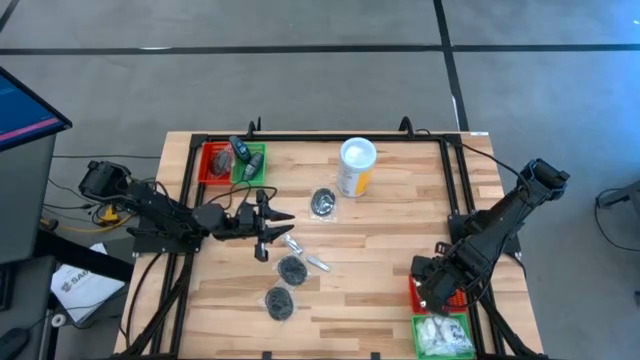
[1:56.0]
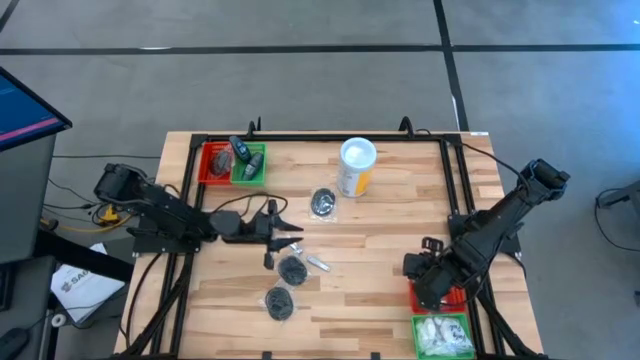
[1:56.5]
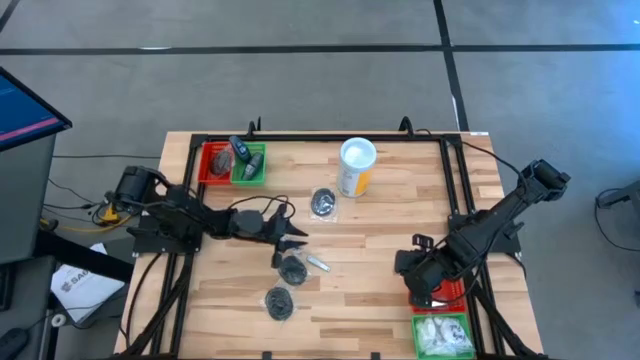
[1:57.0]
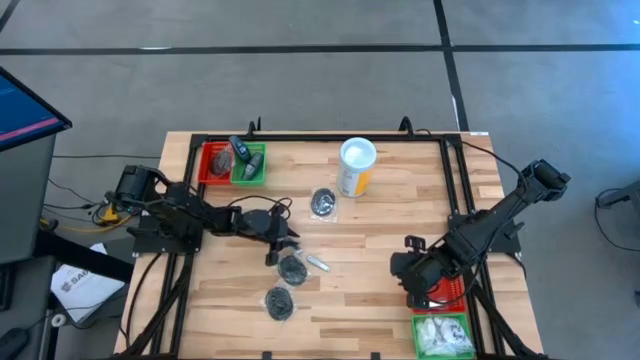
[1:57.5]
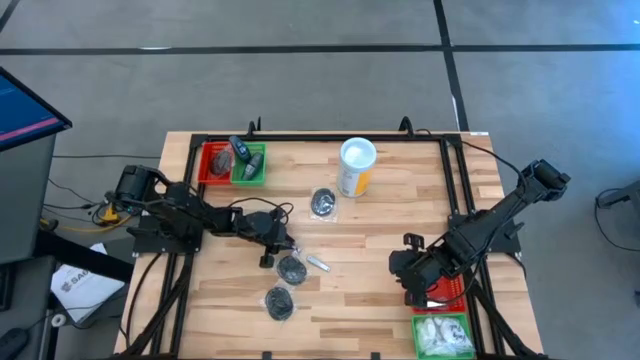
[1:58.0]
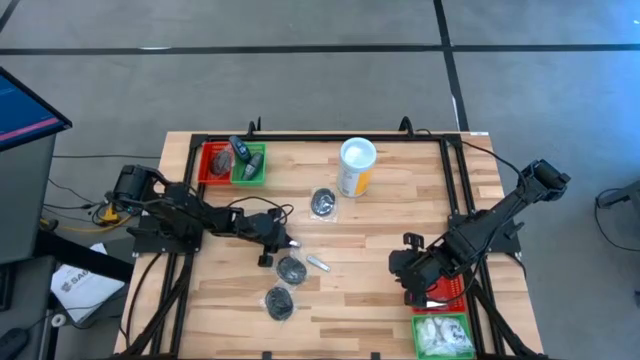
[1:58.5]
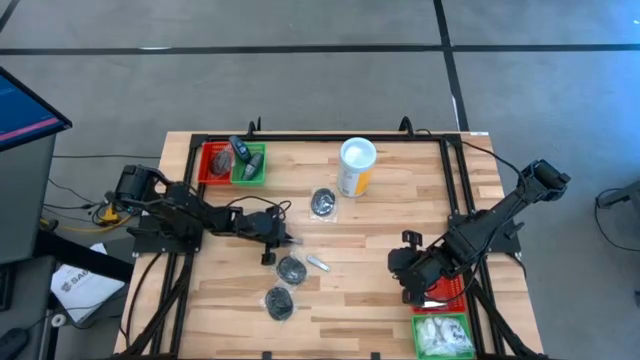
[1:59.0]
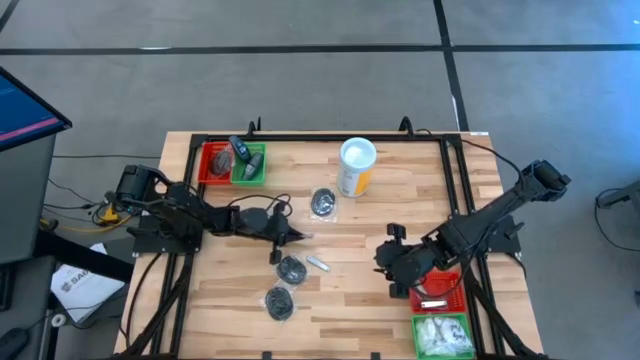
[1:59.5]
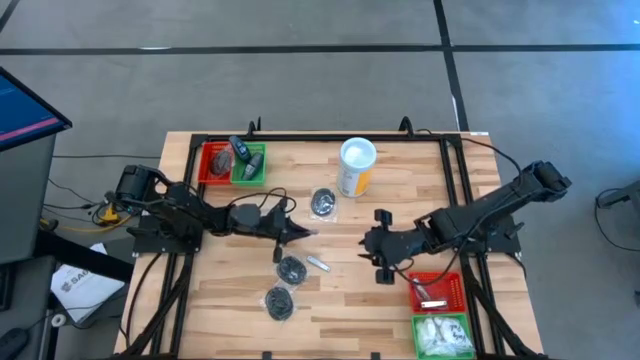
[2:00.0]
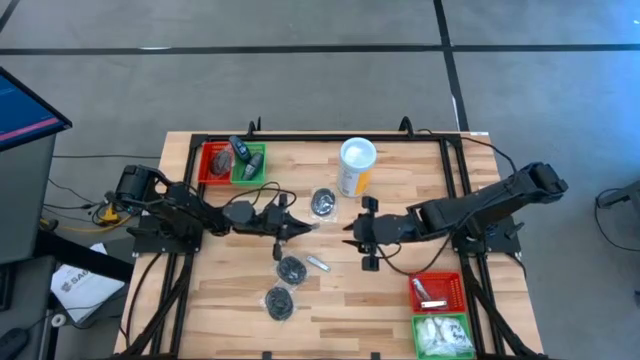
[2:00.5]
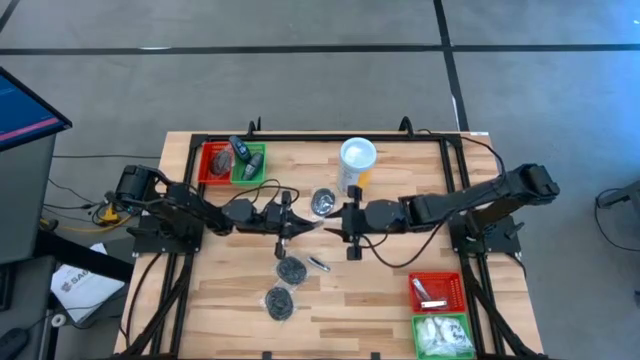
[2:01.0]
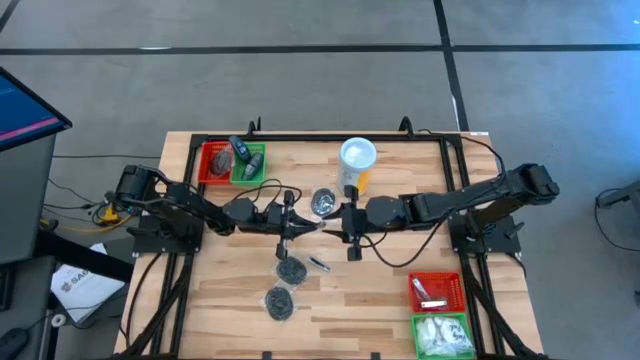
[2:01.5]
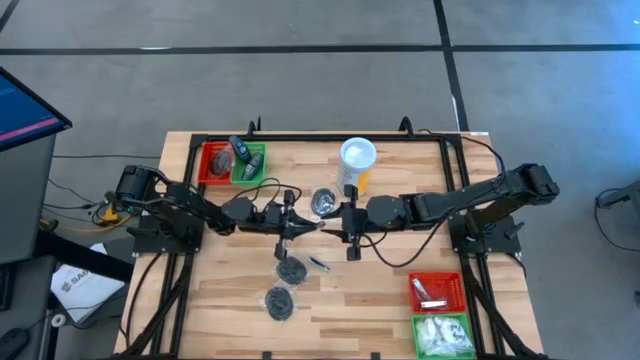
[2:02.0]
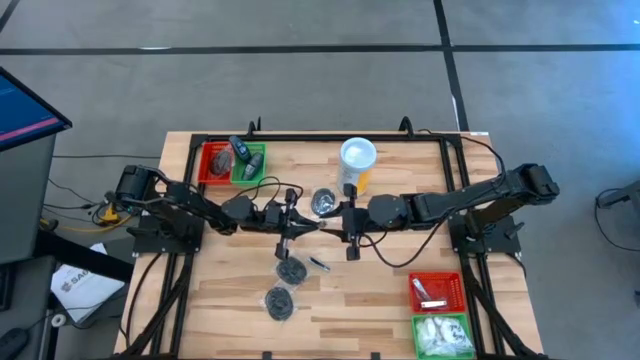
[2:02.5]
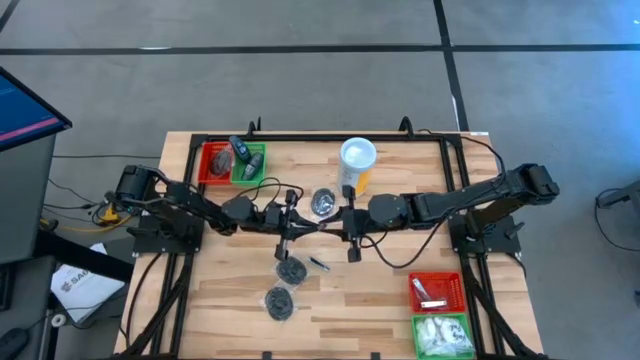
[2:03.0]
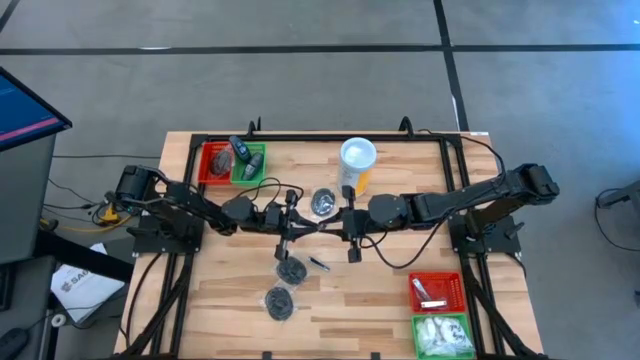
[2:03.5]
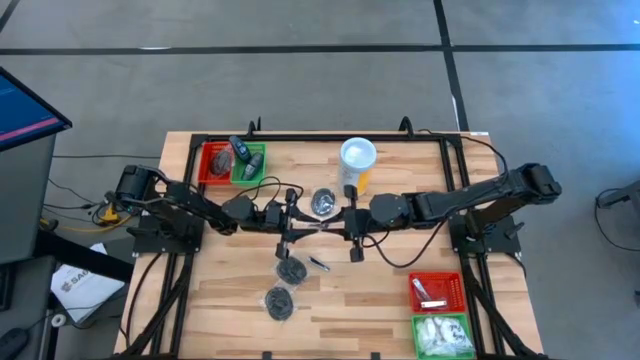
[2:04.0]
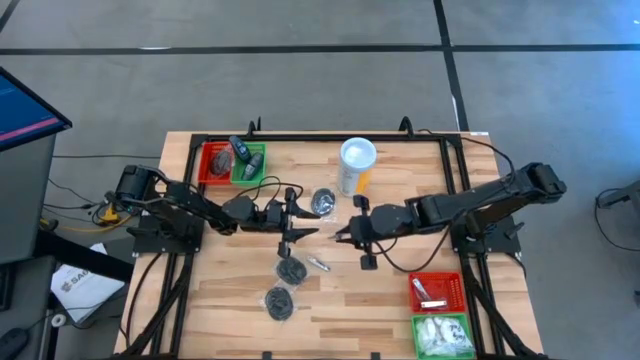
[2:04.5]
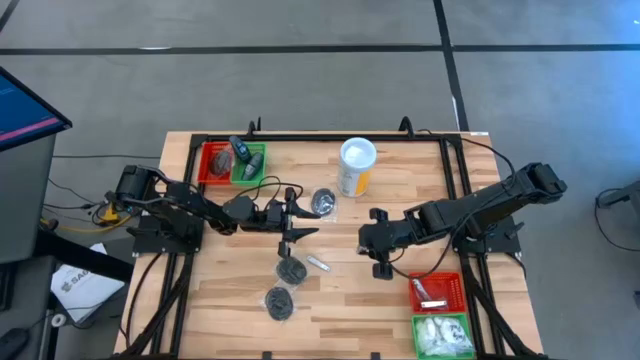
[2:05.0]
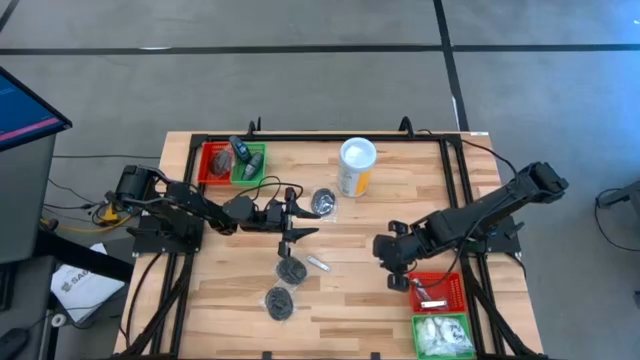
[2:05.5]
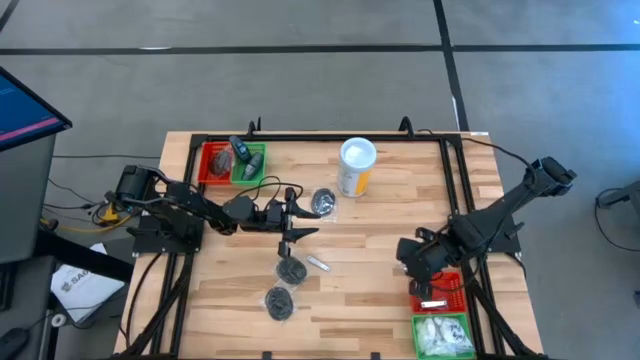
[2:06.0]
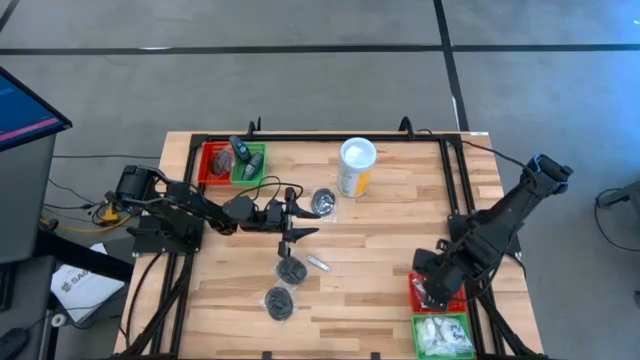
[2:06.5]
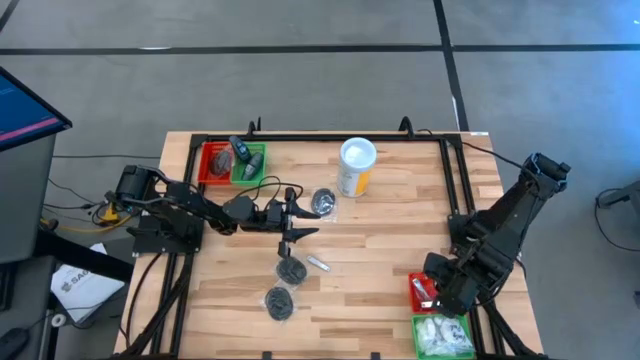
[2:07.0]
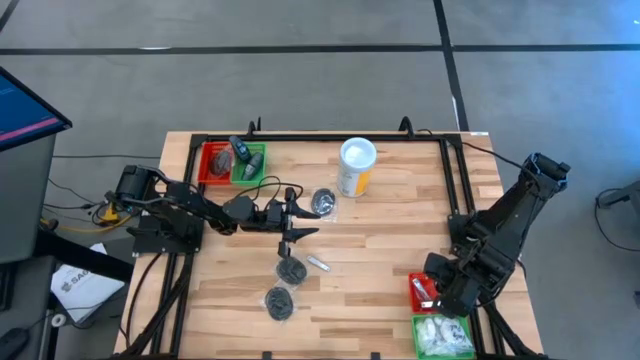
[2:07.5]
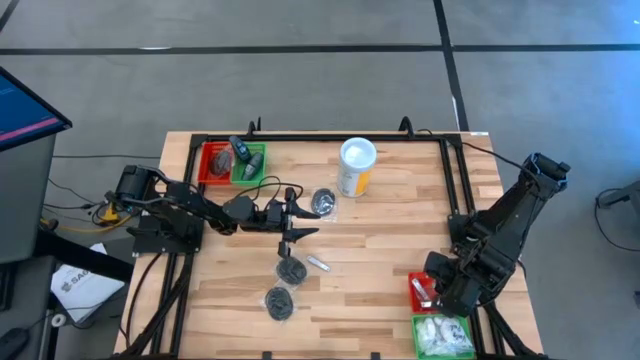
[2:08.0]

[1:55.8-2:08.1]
Task: Pick & Place Travel size toiletries
Put the silver nail cutter into the bottom red bin

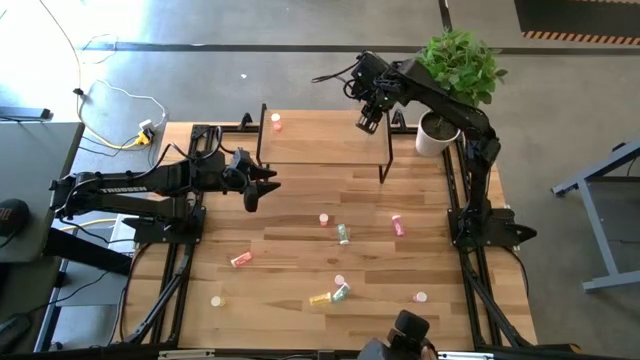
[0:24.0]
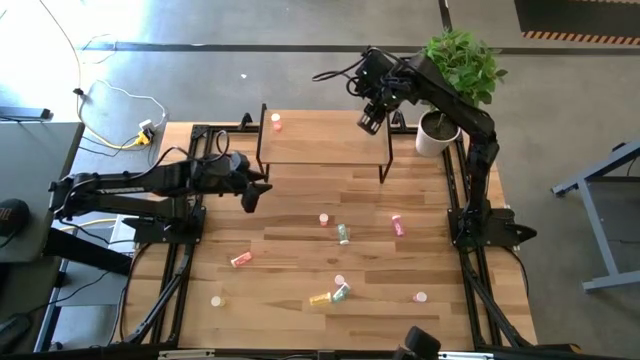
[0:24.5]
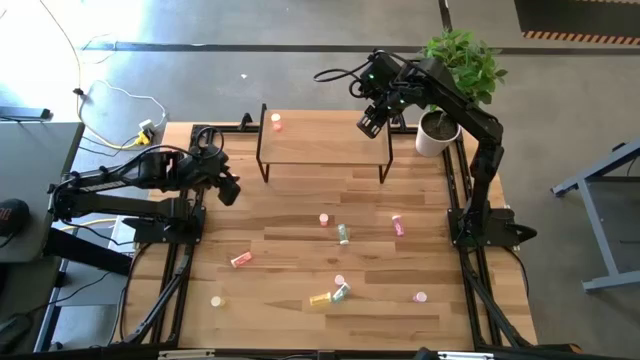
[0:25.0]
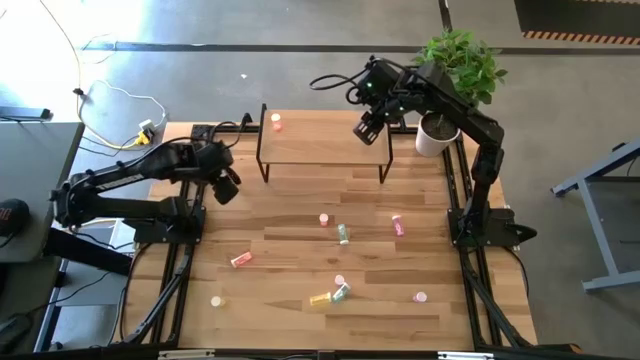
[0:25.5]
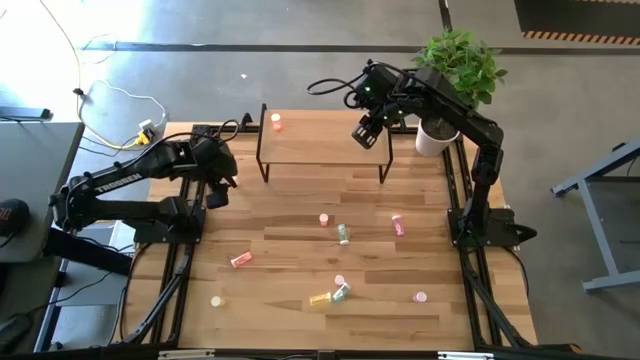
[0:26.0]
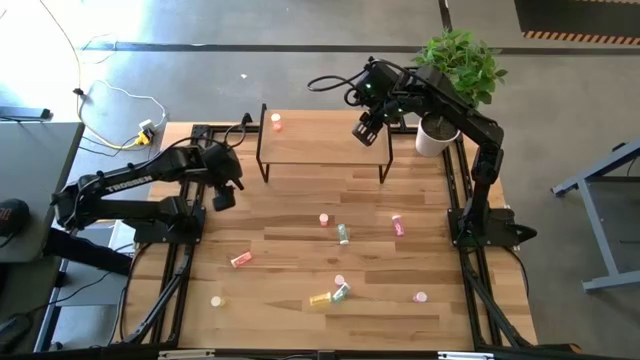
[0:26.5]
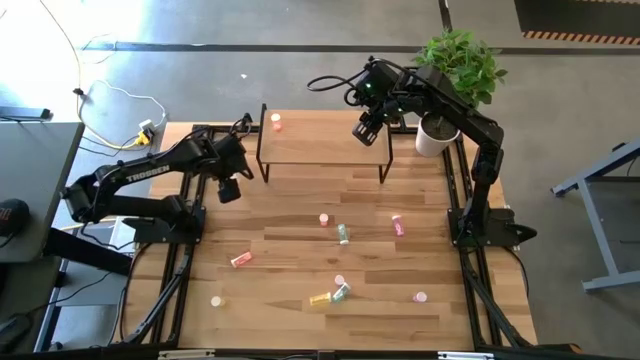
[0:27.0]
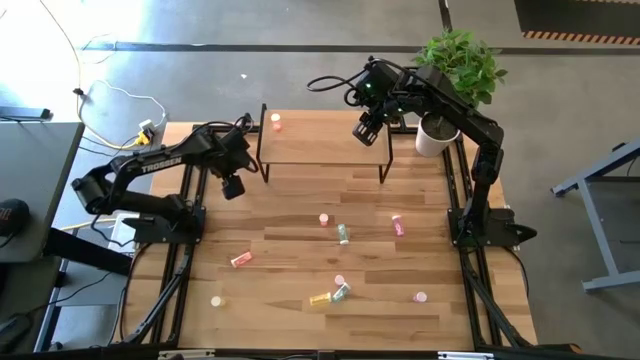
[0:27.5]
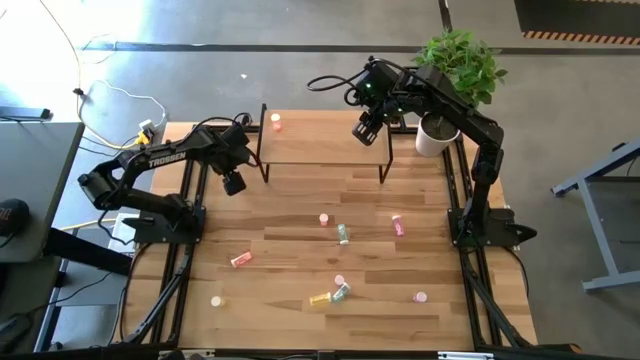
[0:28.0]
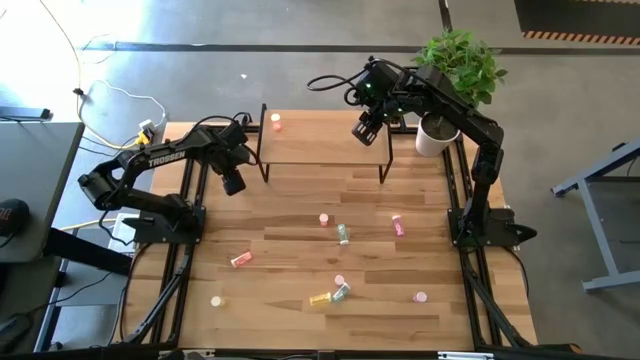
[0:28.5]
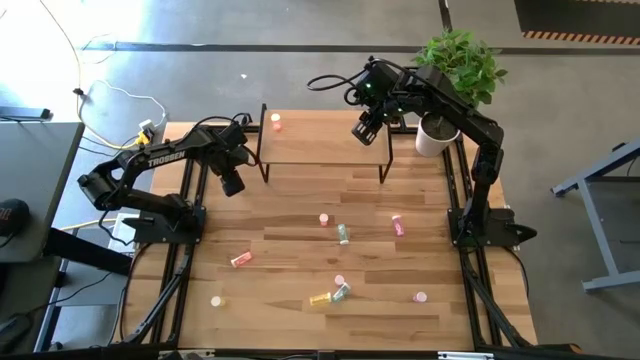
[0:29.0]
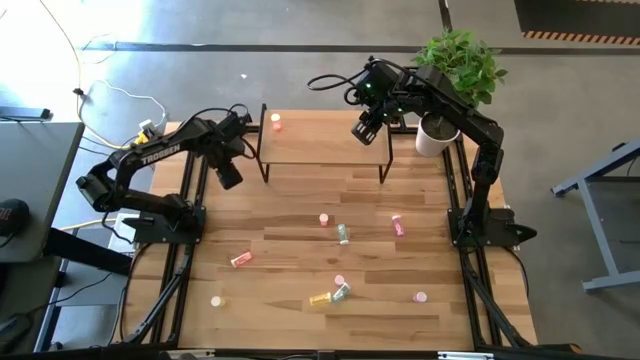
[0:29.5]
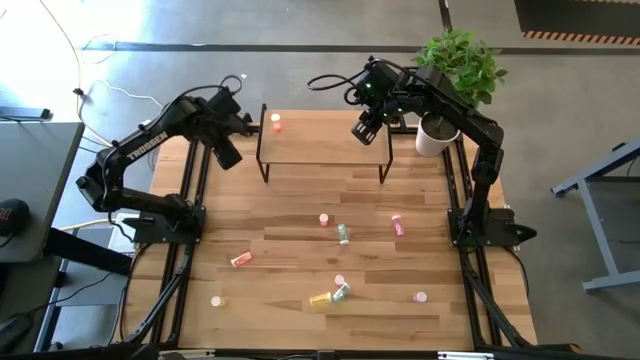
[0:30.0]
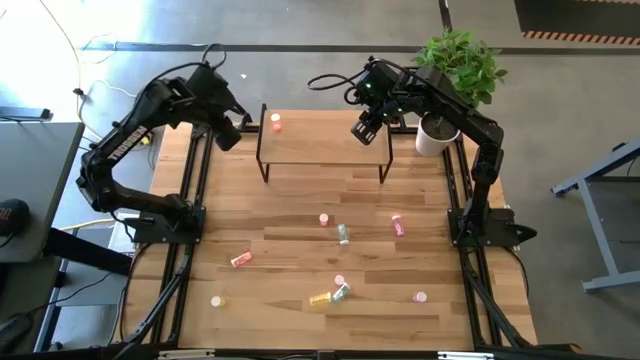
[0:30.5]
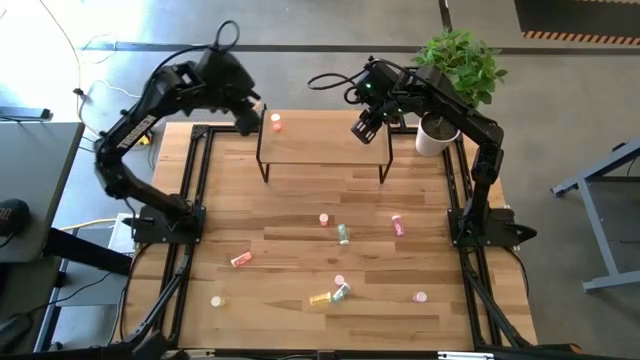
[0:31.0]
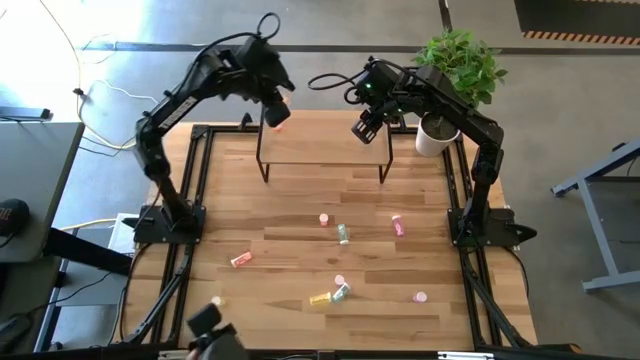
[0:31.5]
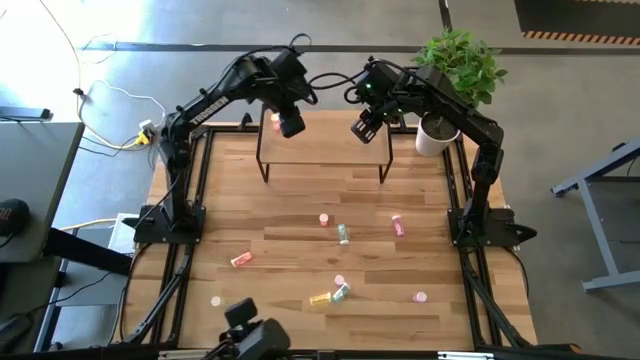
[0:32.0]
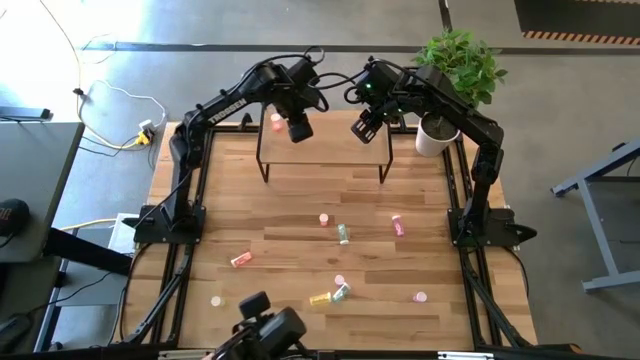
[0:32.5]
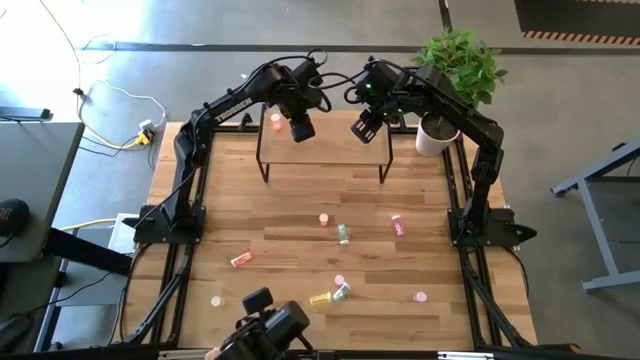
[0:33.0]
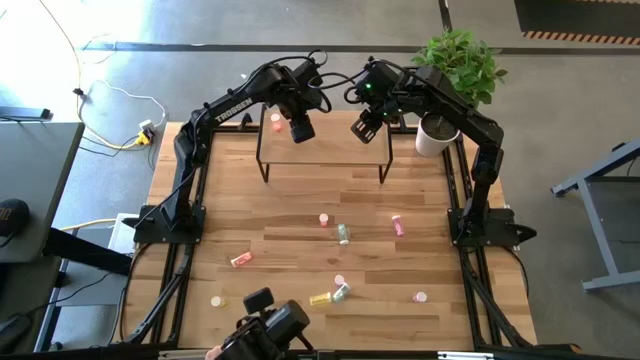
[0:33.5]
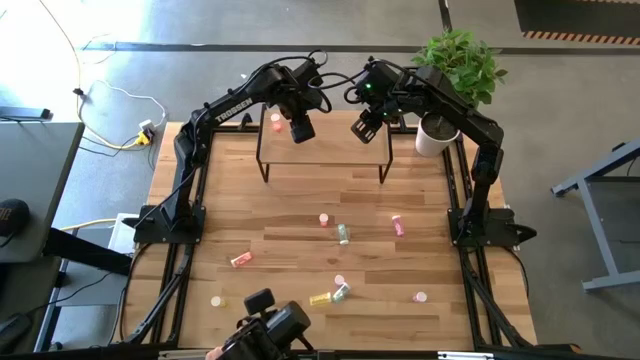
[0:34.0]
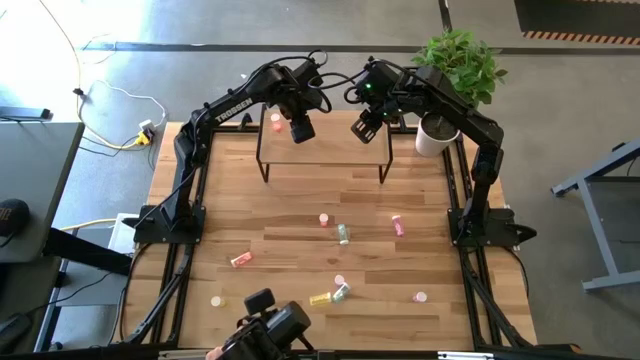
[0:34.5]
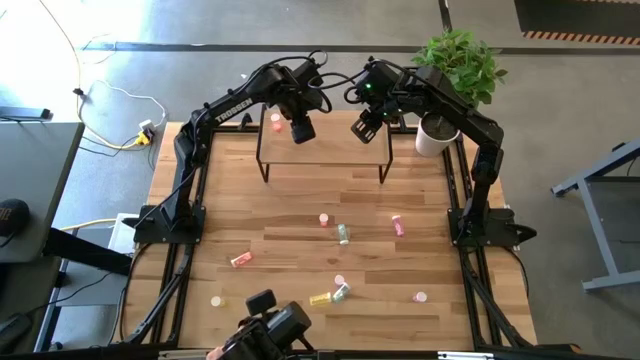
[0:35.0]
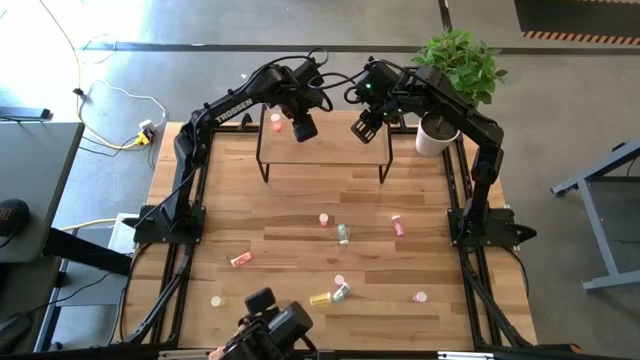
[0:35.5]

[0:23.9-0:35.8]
Task: Pick and place medicine bottles onto shelf by color
Put the top yellow pill bottle on the shelf
